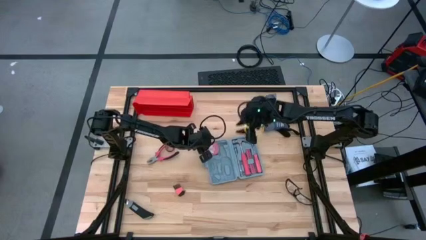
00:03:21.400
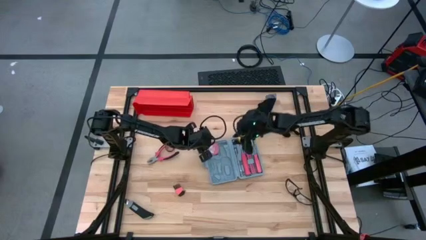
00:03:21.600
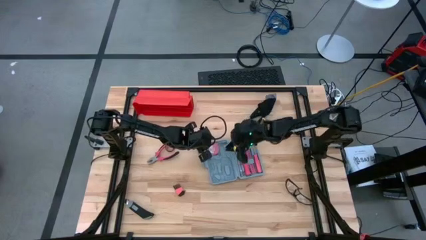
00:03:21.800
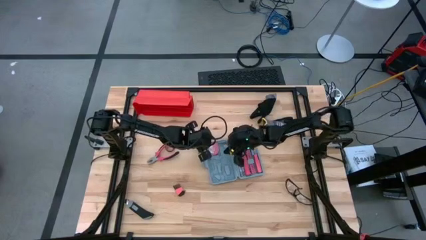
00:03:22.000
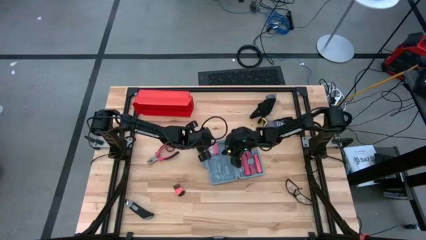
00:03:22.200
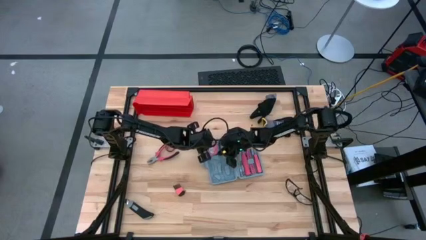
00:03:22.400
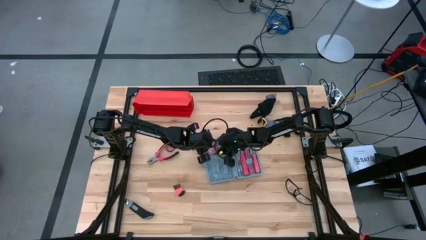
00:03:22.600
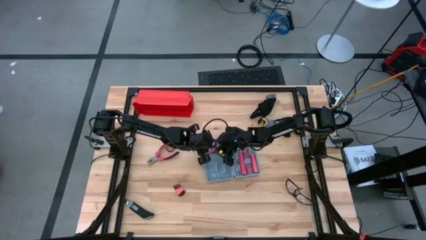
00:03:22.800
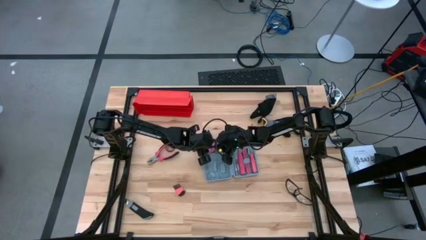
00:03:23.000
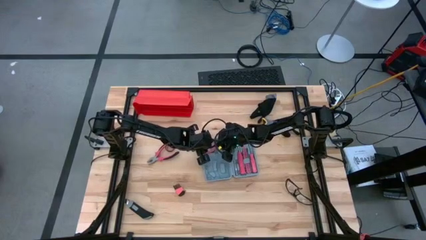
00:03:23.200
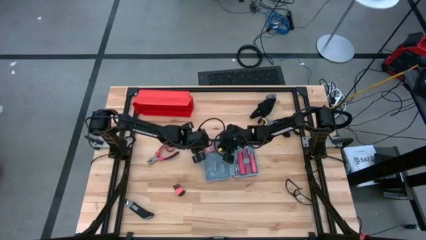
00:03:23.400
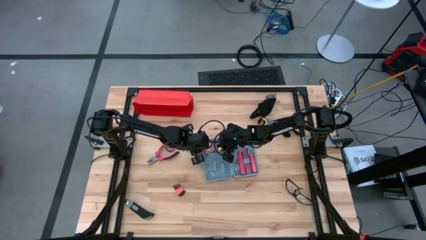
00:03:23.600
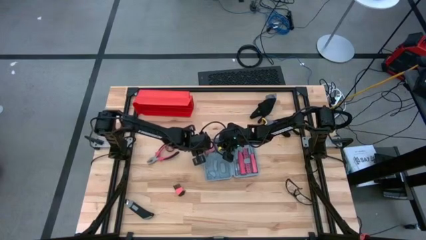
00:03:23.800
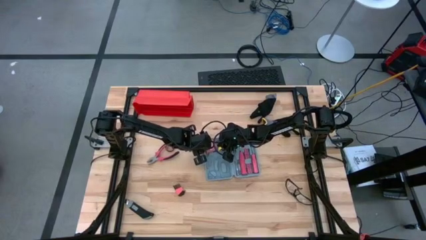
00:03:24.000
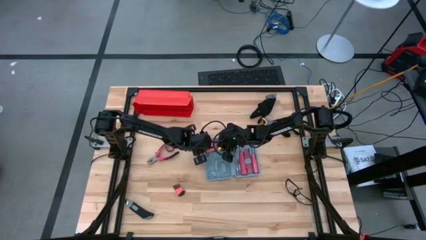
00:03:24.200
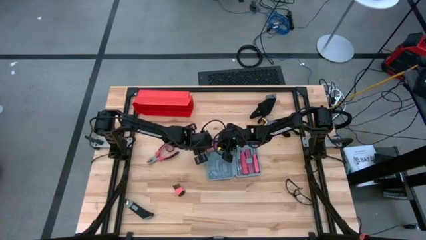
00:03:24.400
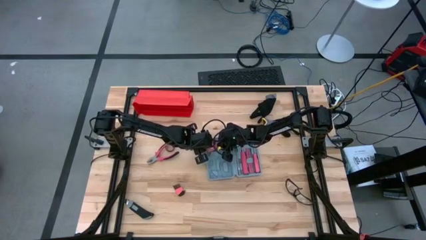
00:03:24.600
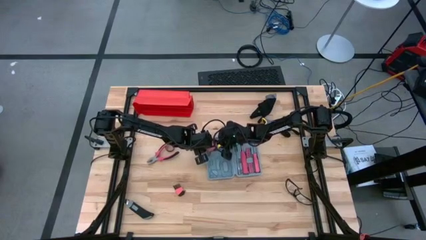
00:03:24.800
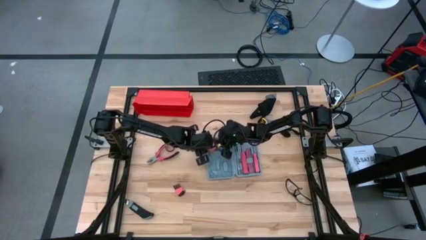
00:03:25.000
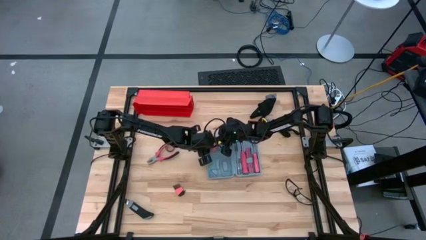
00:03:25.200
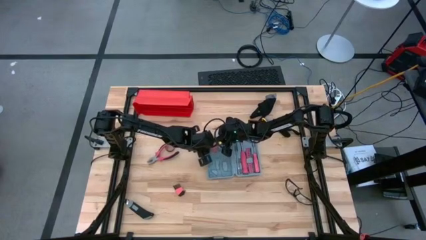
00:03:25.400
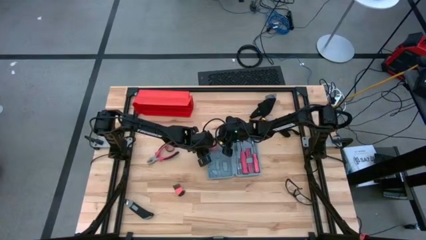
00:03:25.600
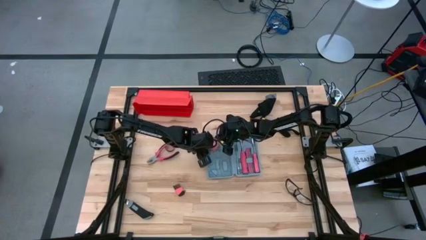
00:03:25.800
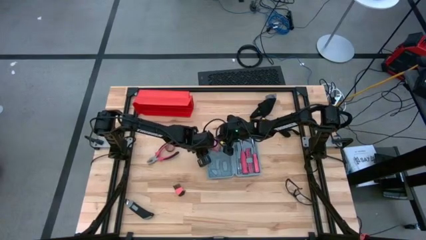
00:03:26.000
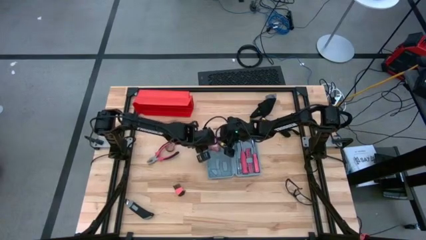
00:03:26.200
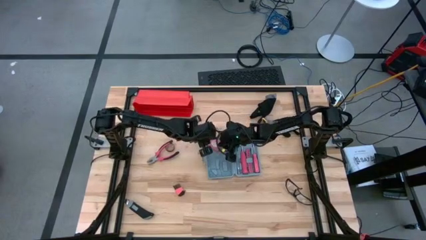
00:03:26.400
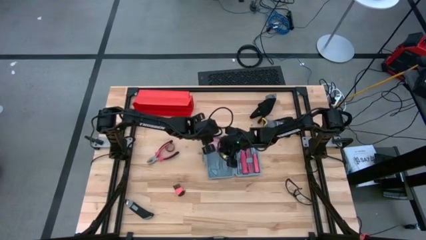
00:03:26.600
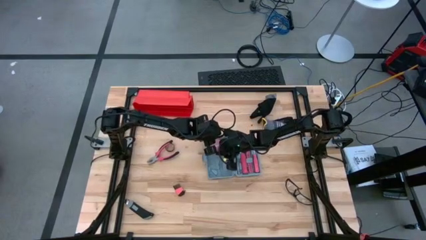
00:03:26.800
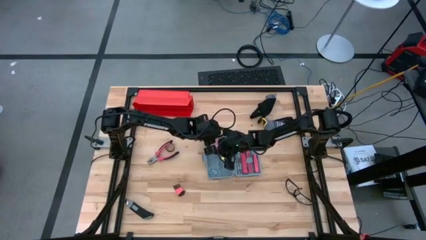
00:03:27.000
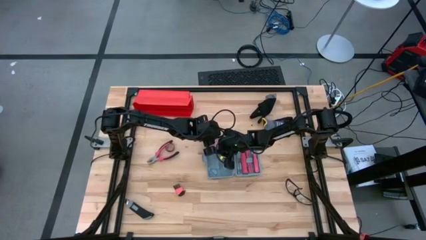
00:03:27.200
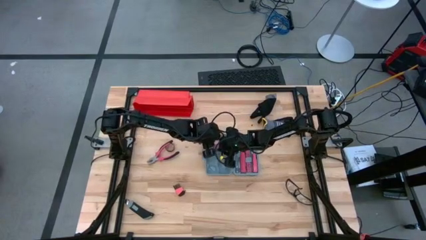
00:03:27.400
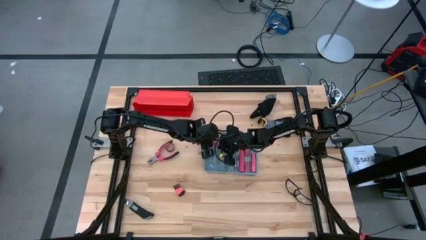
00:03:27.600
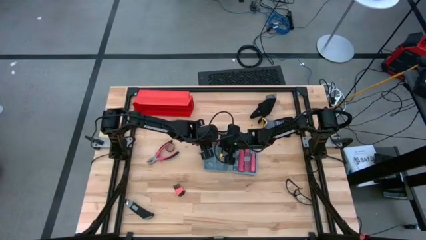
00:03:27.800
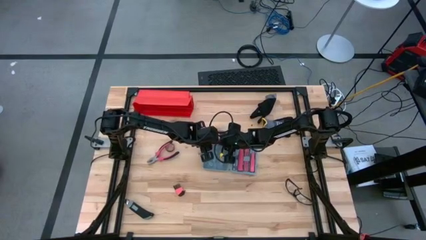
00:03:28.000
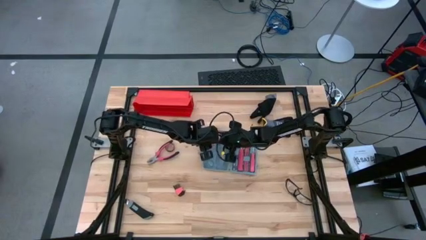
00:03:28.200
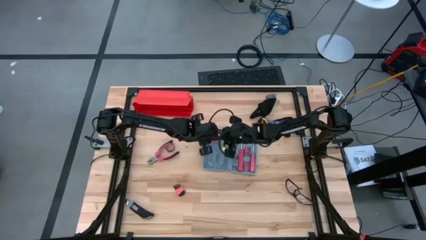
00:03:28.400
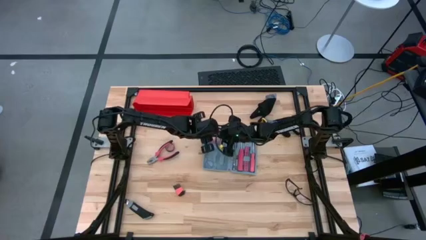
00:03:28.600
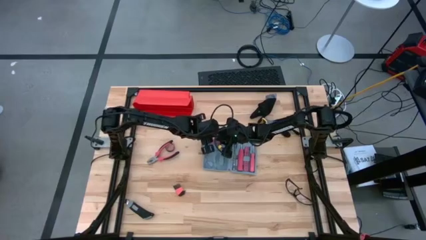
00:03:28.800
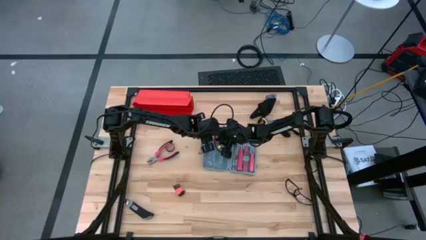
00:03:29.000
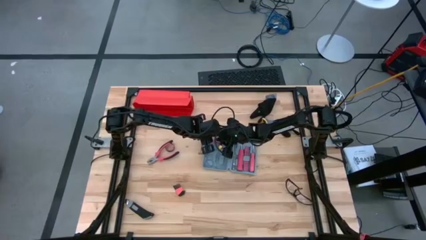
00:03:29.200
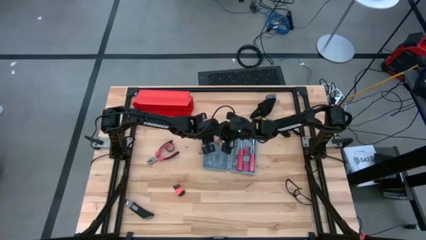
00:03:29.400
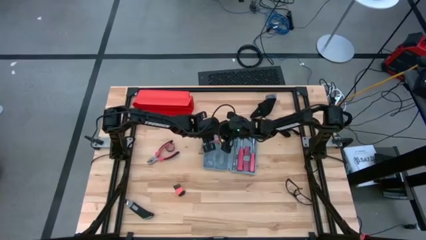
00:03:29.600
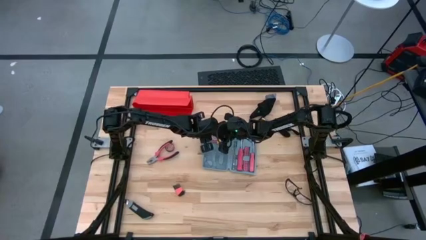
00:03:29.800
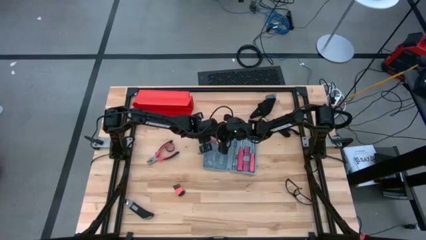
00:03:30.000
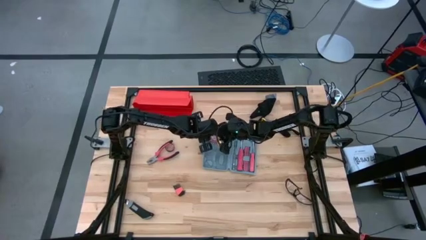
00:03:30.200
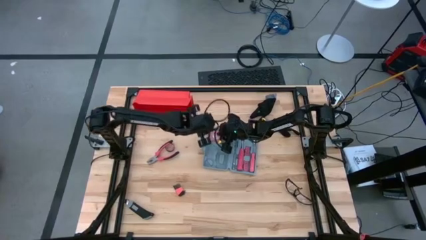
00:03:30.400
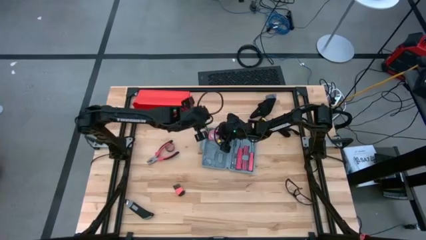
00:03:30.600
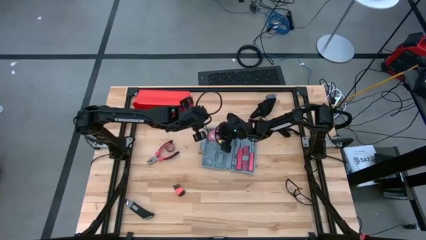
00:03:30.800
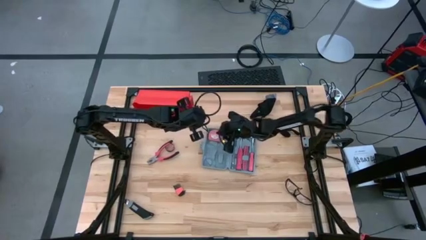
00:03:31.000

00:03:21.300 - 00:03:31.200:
Task: prefit tool cases
Put the orange measuring tape into the gray pre-fit tool case

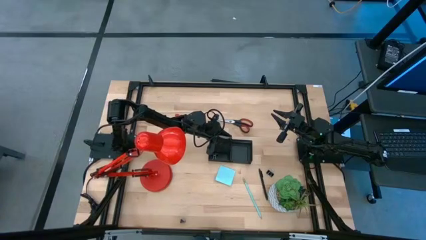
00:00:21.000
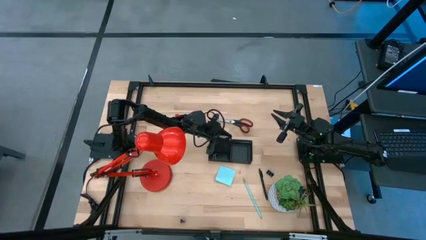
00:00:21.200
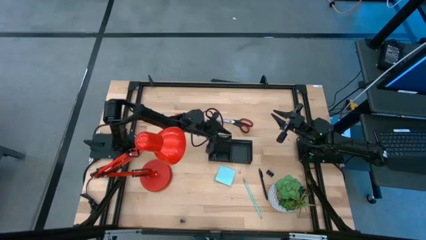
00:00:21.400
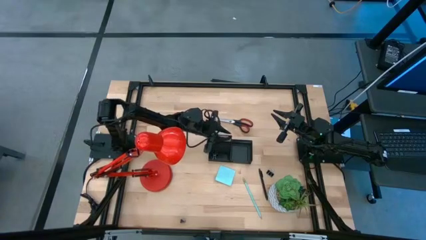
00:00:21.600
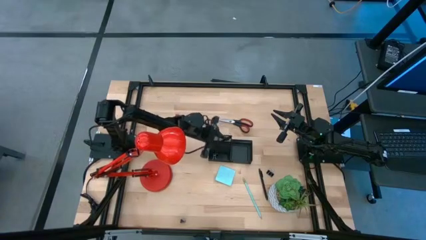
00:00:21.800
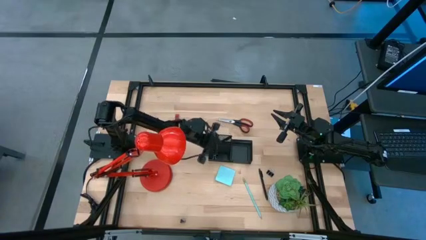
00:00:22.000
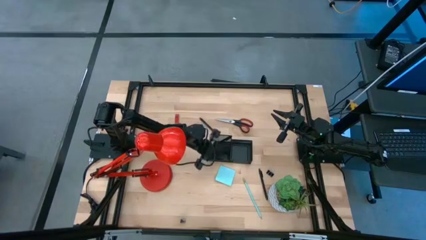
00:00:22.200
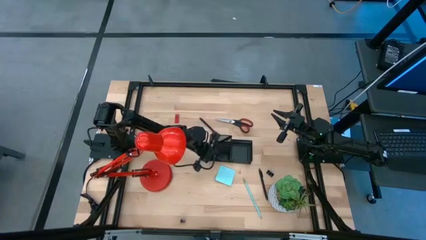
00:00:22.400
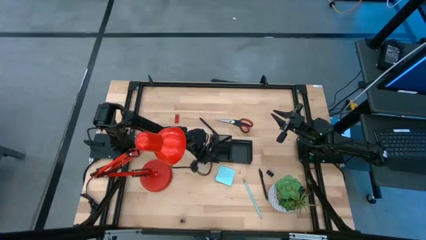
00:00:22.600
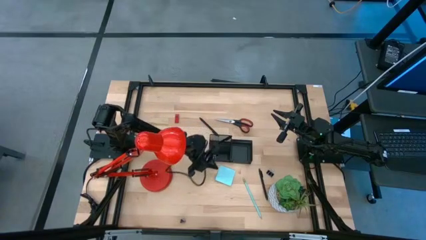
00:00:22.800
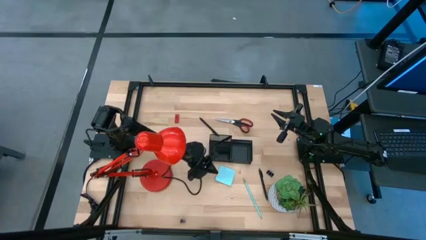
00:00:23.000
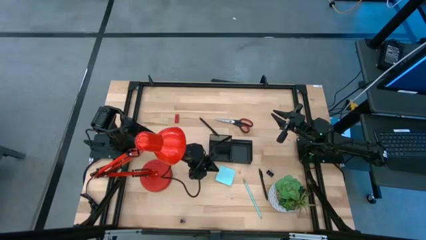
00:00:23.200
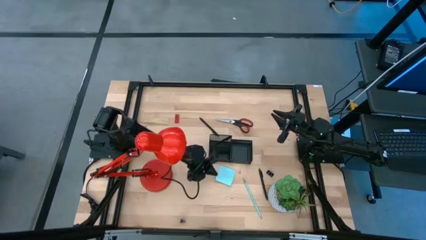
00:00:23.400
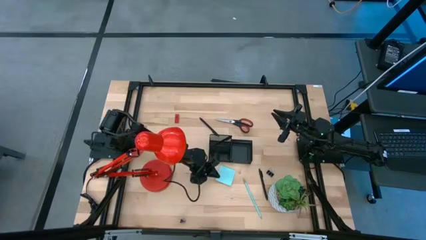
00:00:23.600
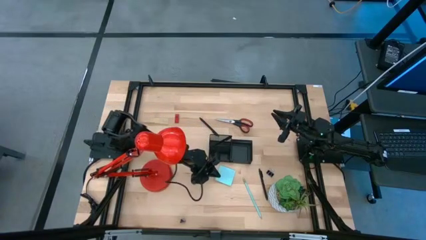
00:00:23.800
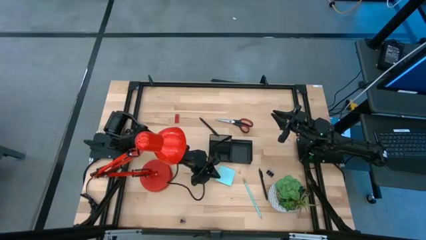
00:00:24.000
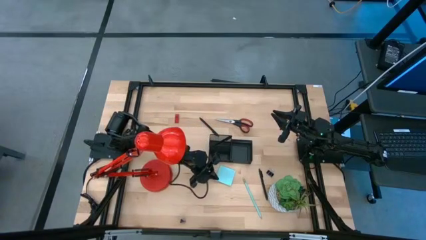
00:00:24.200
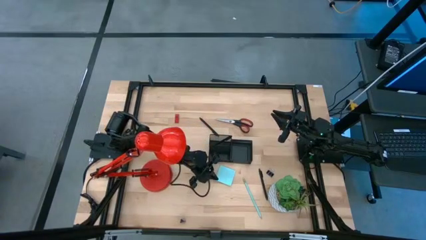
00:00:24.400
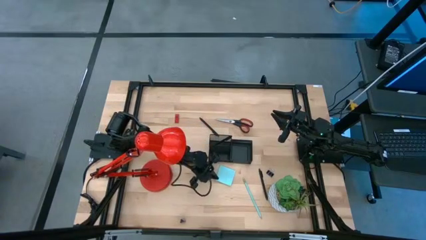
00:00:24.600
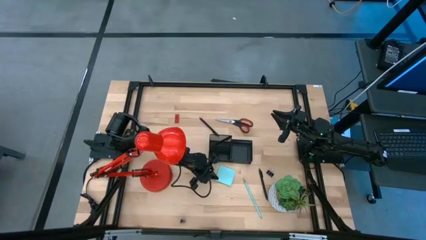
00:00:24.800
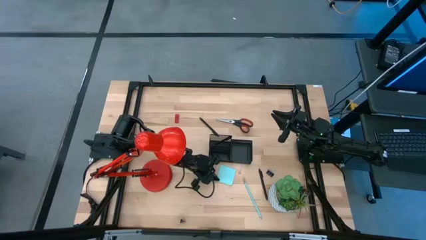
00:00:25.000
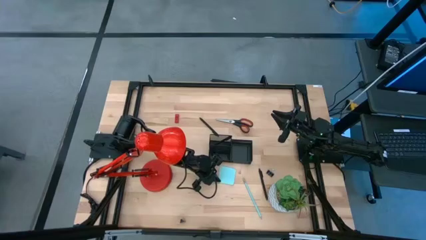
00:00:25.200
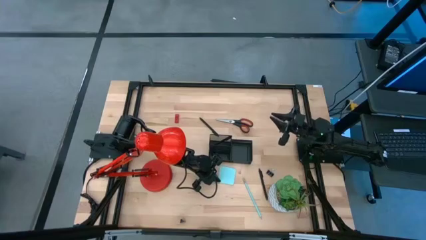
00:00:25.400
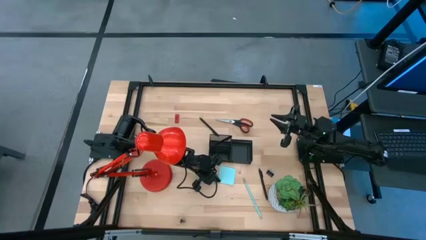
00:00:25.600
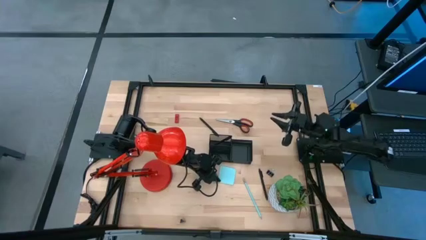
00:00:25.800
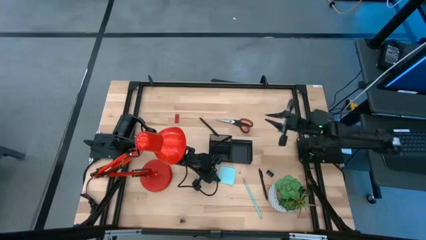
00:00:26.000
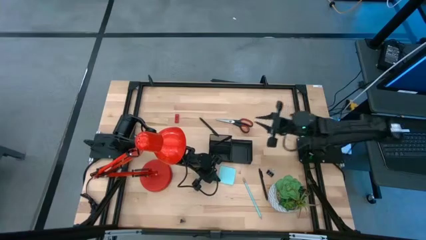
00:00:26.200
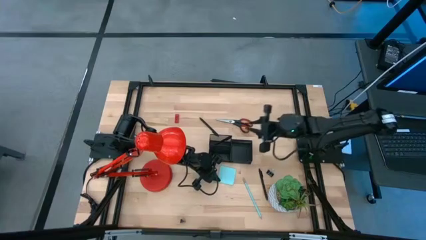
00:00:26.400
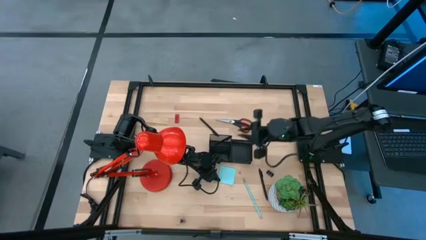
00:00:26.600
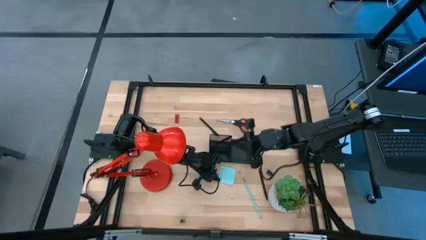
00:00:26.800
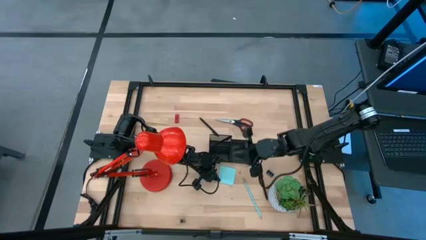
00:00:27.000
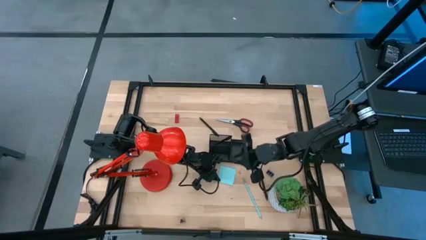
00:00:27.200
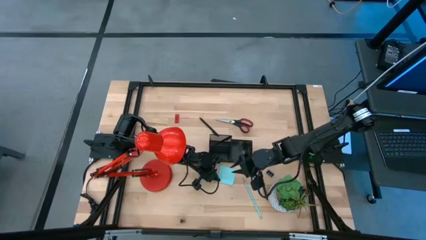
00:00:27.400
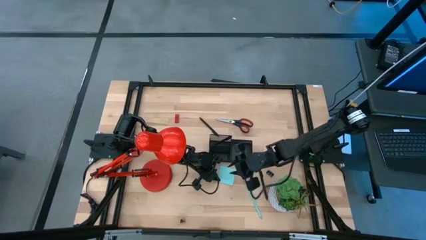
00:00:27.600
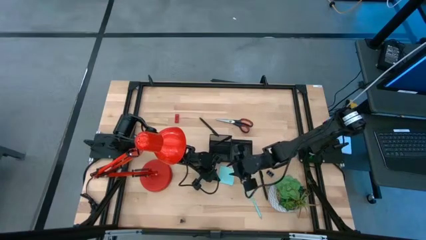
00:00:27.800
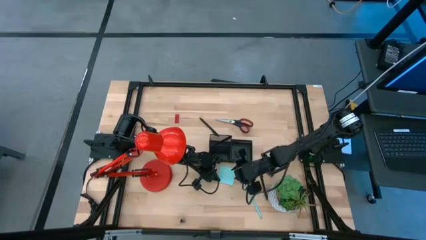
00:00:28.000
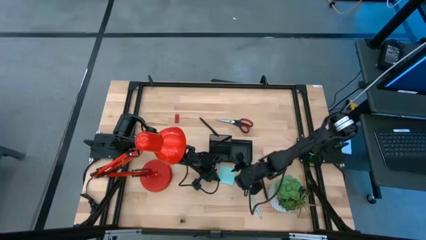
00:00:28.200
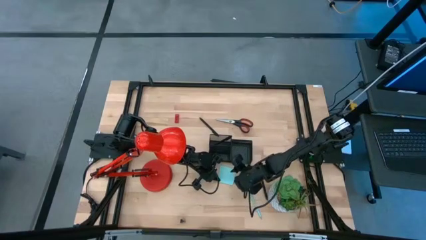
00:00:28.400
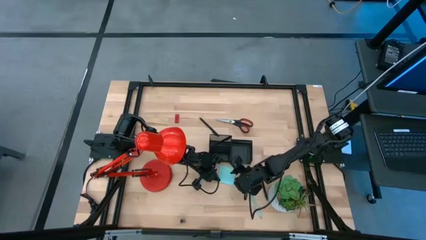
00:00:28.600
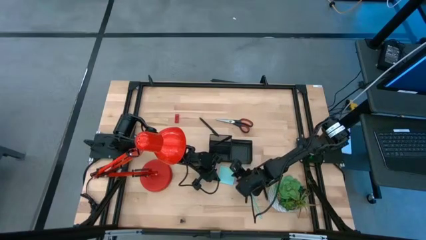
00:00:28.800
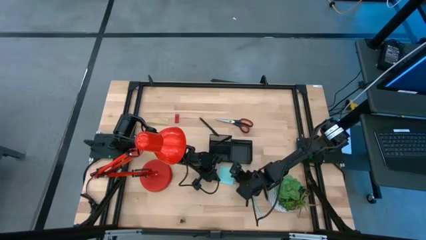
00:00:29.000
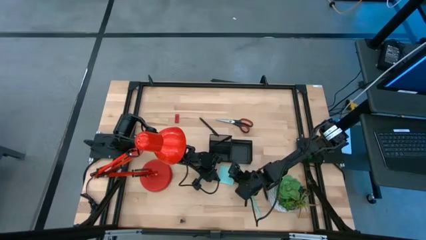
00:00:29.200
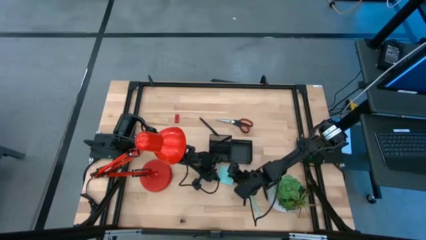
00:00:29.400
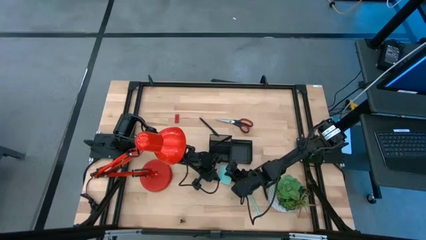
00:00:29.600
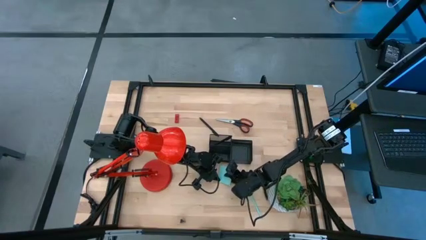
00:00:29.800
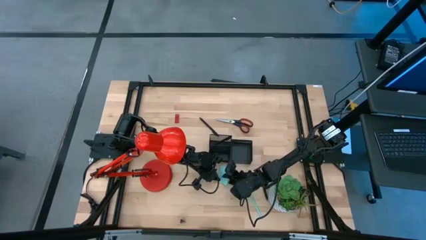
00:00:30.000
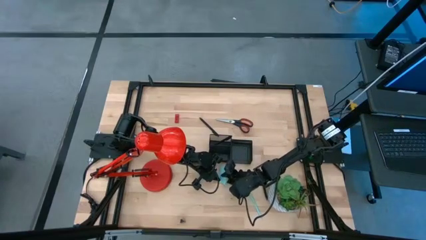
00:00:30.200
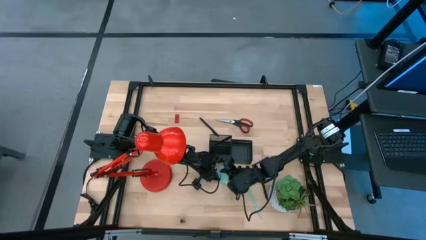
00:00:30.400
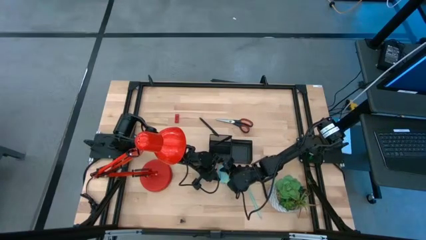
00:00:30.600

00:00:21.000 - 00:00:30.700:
Task: Pick and place office supplies into organizer
Put the light blue sticky notes into the black desk organizer
